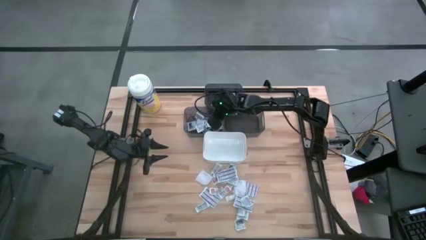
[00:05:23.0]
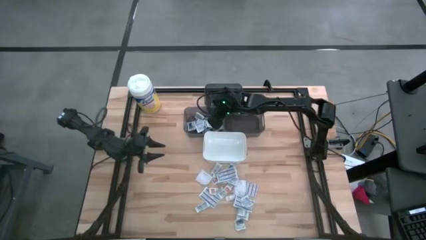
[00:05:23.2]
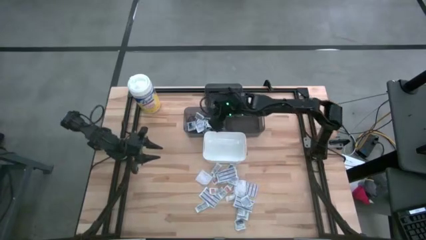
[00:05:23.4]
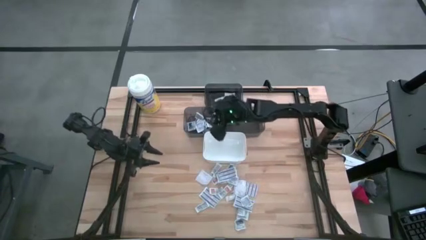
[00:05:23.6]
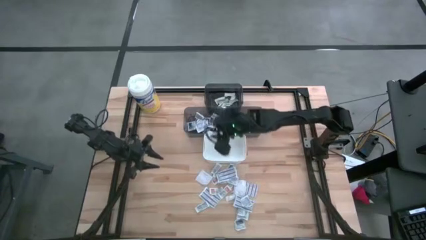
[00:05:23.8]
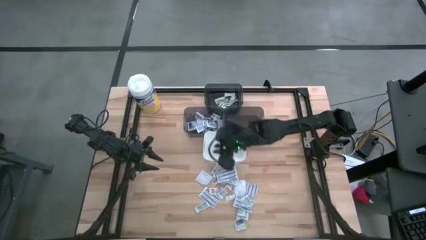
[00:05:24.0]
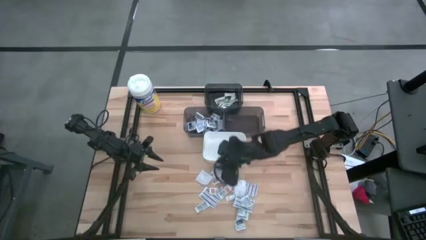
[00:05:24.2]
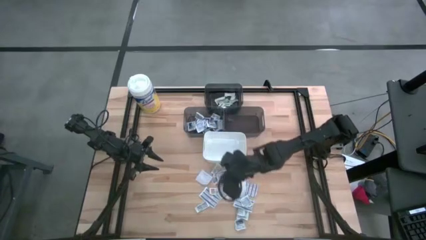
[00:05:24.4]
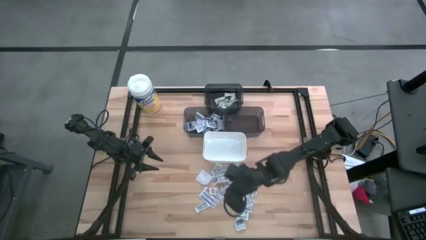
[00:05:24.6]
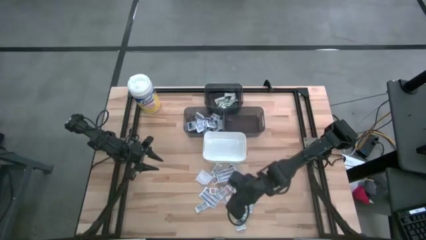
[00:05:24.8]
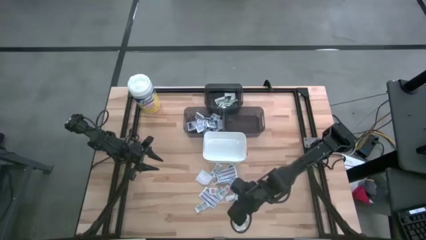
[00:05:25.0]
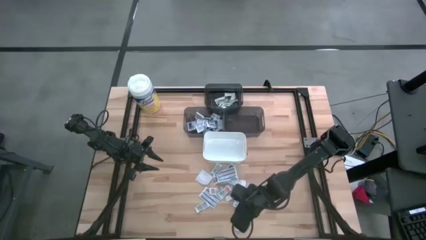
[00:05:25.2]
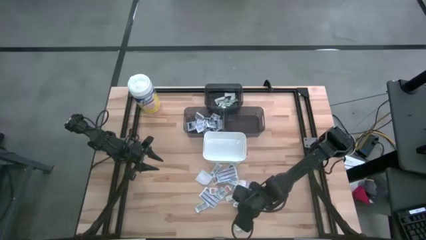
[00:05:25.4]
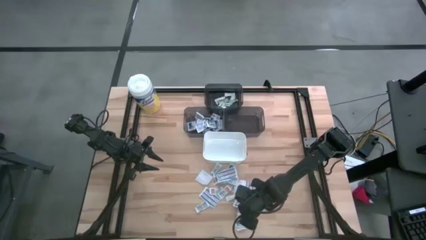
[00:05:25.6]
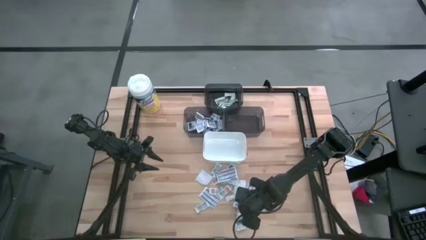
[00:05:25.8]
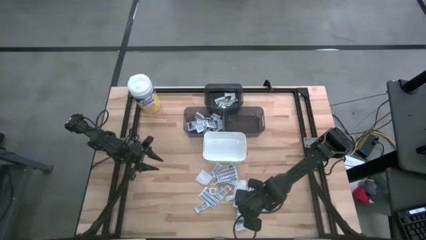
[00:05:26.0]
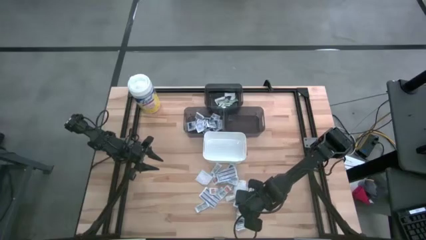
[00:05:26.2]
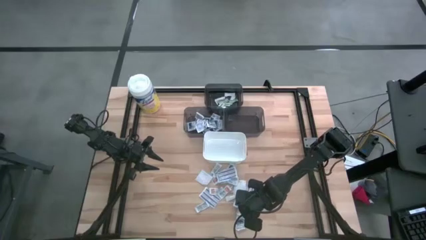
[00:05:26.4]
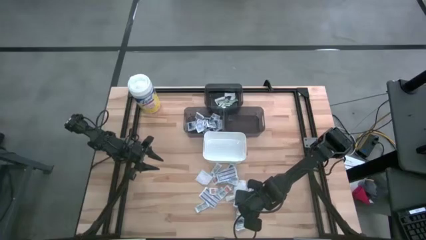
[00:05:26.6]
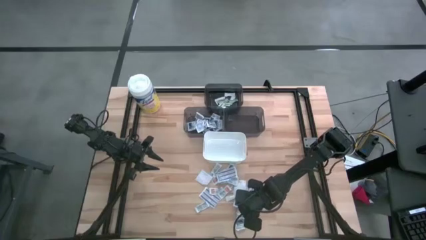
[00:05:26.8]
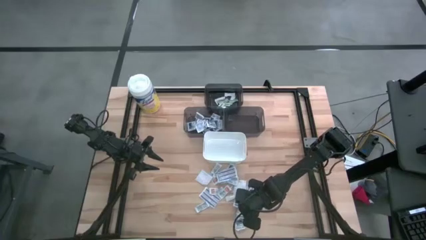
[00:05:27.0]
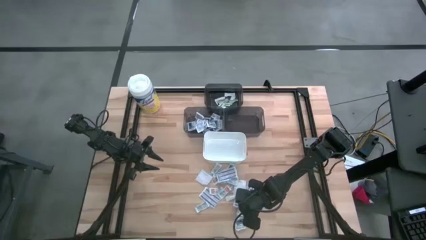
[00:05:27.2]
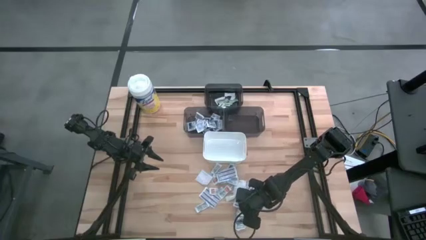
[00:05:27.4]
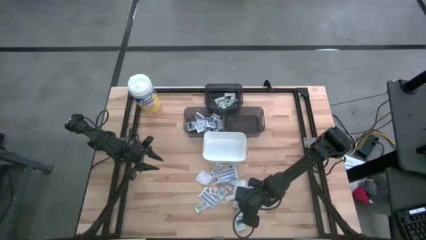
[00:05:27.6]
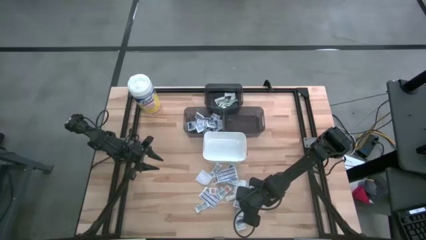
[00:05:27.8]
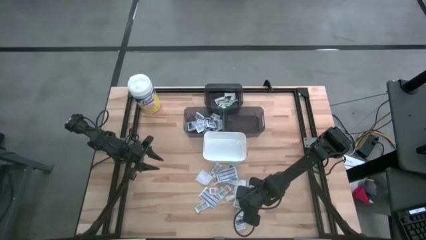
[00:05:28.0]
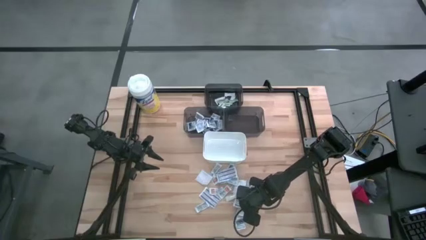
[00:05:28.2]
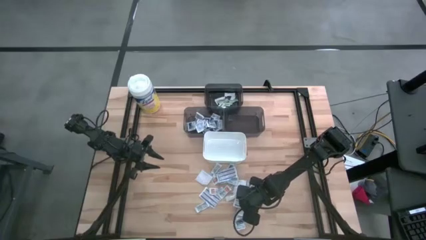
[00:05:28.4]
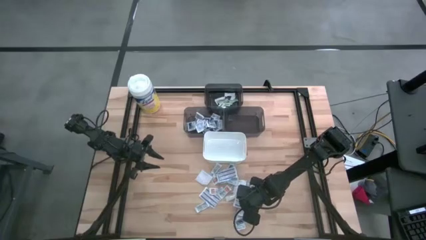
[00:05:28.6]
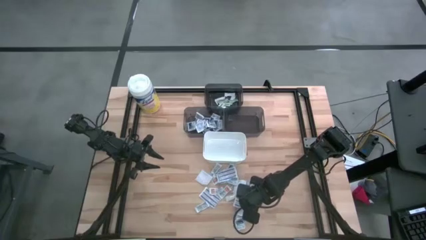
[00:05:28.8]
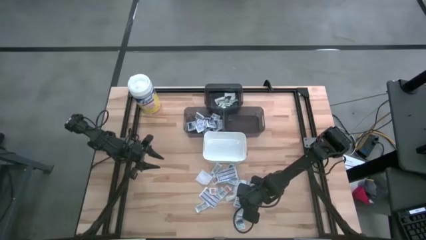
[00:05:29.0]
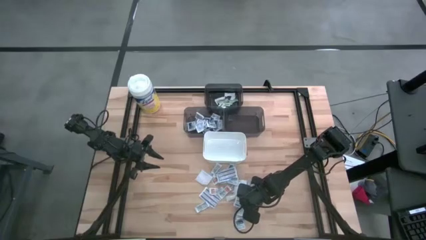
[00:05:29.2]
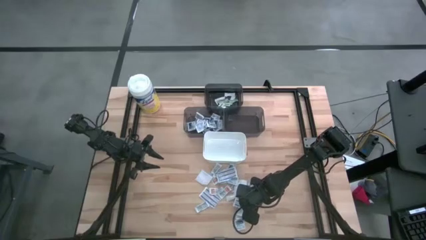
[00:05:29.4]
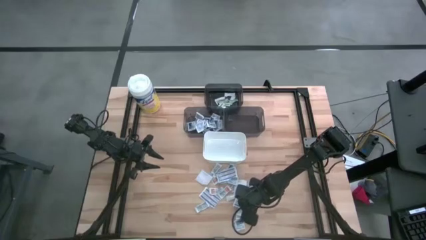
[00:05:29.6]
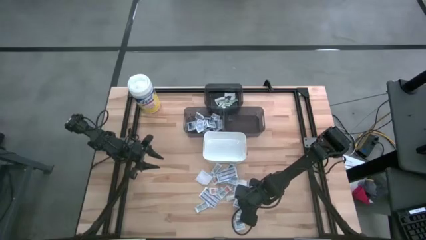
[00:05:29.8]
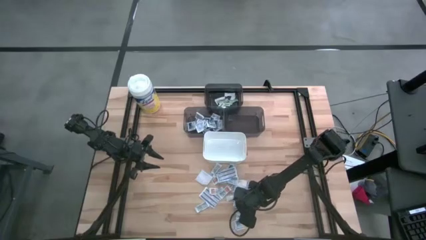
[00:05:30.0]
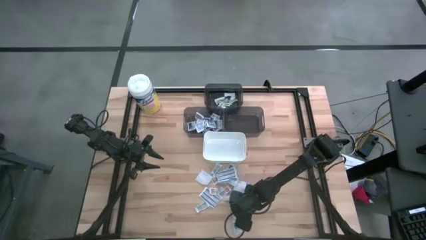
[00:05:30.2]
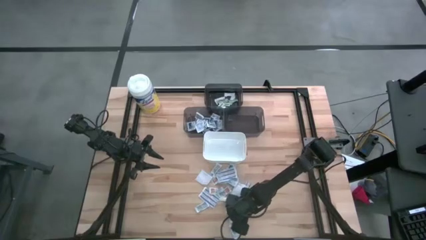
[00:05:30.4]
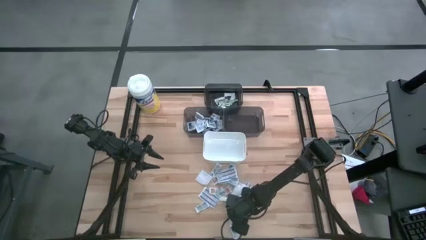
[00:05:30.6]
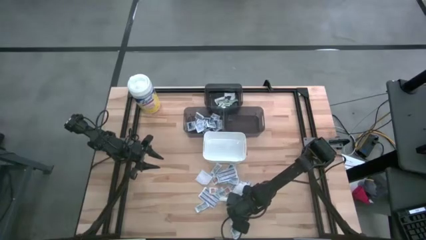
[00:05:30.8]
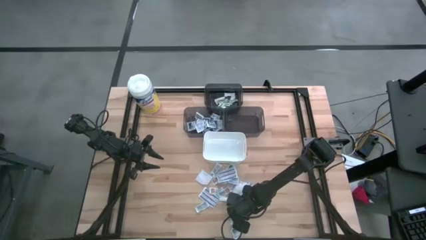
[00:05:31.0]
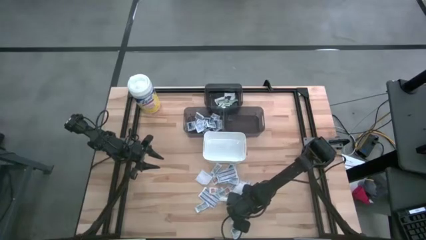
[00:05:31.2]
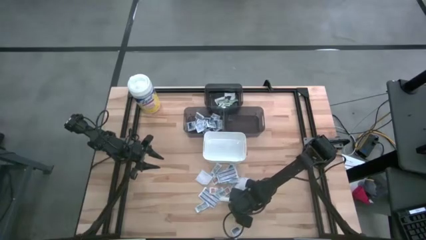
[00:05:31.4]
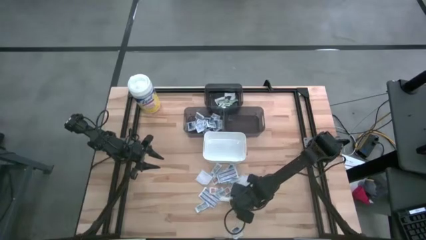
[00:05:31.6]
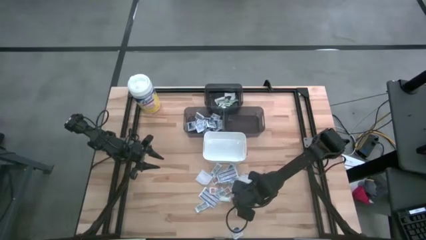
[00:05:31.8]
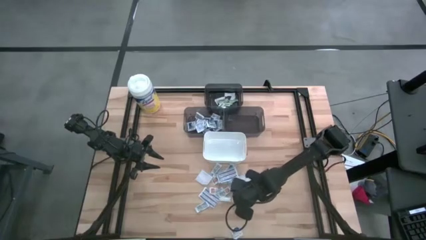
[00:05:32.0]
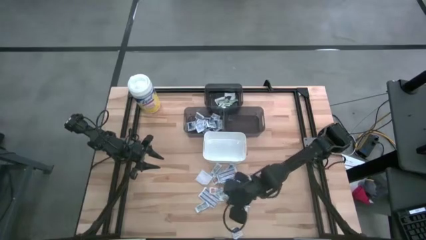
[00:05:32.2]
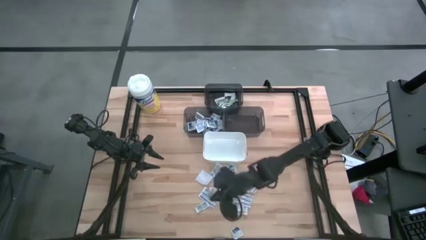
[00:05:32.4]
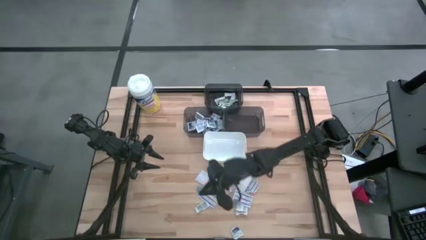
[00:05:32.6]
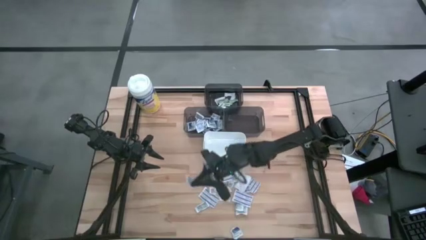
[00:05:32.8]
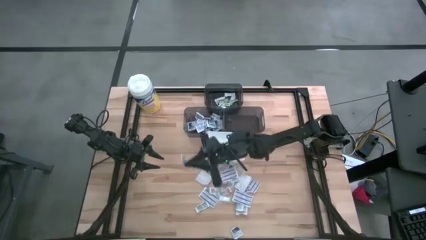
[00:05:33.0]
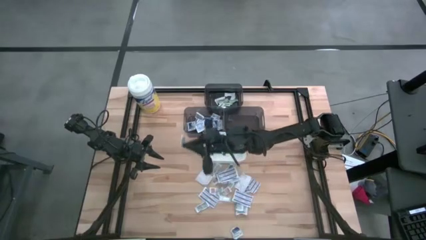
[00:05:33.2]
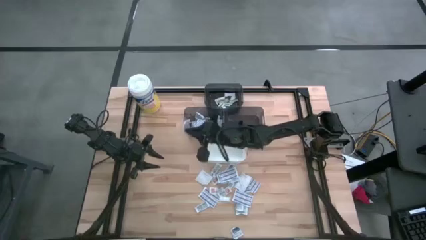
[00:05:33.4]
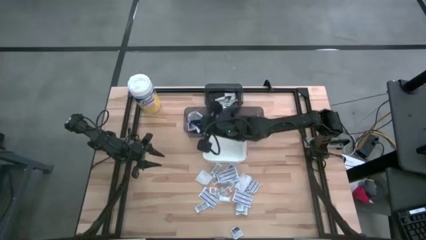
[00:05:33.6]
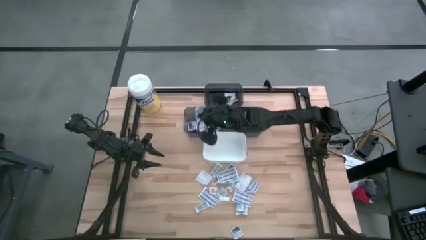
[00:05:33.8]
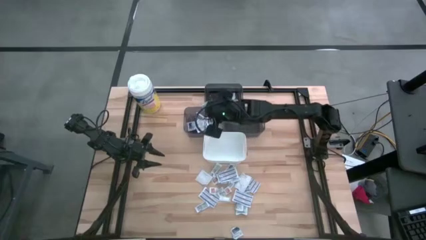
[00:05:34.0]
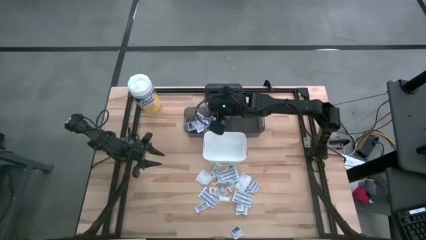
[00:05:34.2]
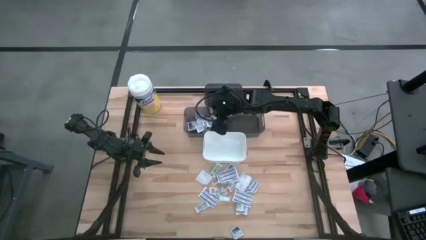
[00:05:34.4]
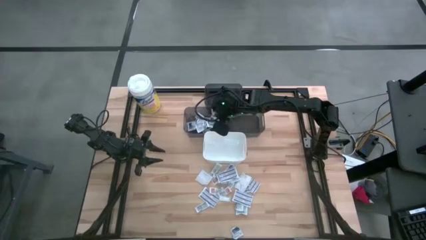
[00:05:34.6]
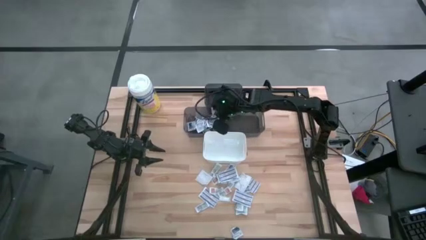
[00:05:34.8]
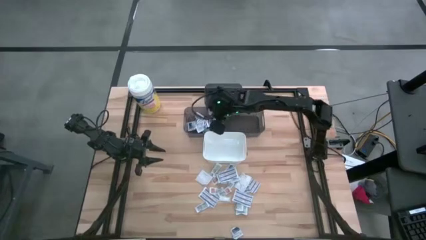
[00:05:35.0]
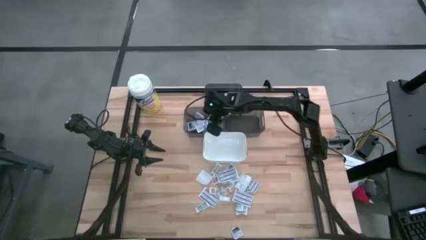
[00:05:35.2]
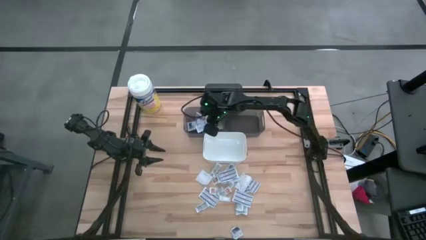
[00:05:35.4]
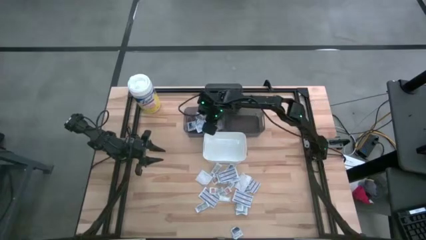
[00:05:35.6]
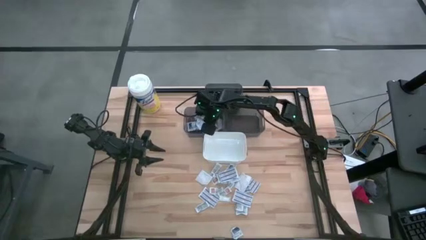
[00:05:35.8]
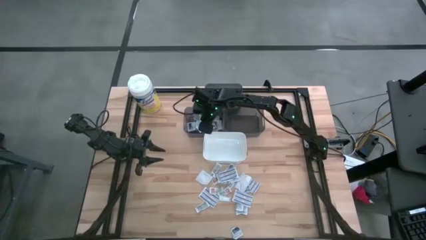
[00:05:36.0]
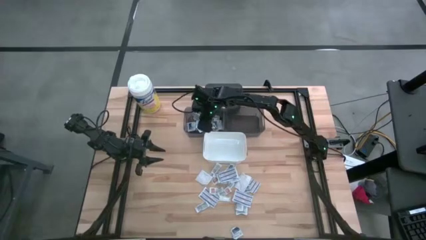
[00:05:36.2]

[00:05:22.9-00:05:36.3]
Task: Pick & Place First Aid Supplies
Put the alcohol pad into the left black bin

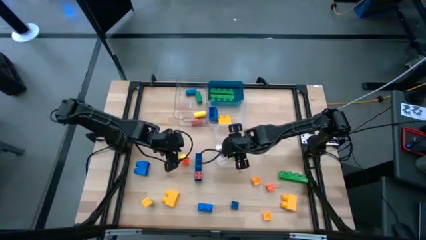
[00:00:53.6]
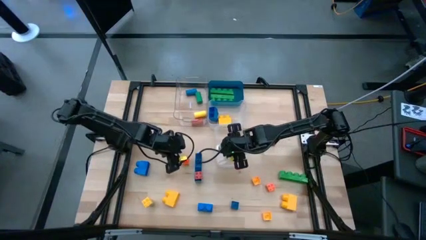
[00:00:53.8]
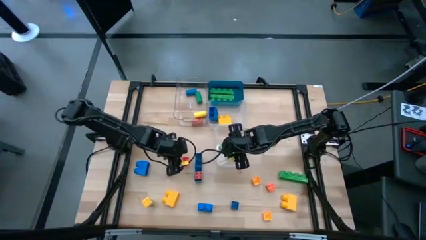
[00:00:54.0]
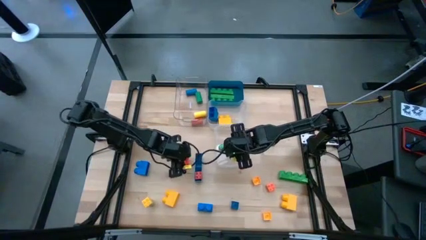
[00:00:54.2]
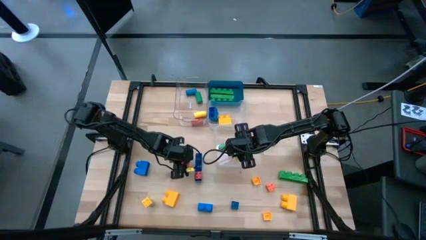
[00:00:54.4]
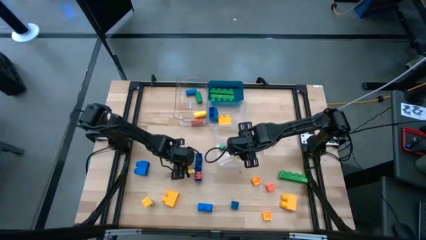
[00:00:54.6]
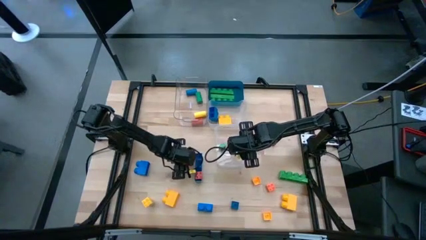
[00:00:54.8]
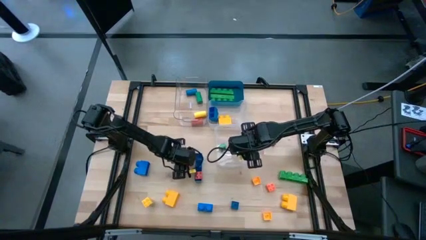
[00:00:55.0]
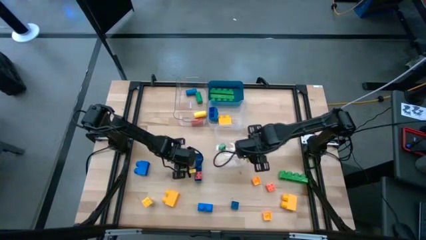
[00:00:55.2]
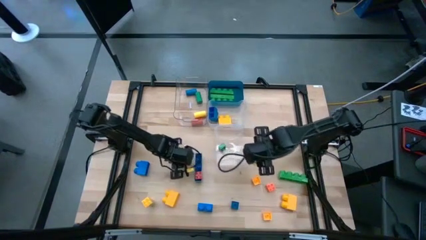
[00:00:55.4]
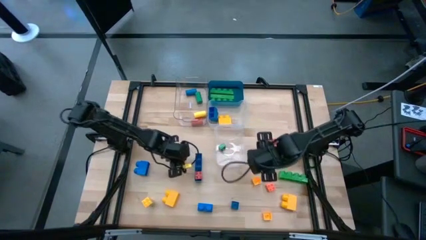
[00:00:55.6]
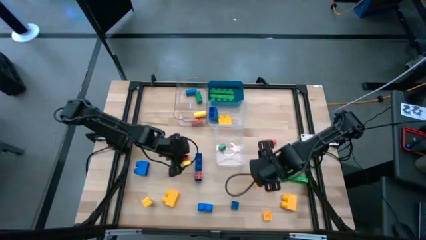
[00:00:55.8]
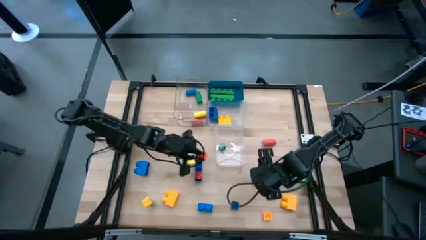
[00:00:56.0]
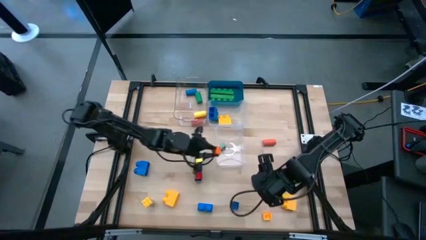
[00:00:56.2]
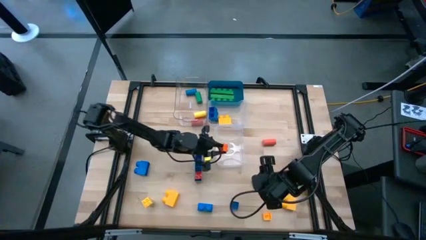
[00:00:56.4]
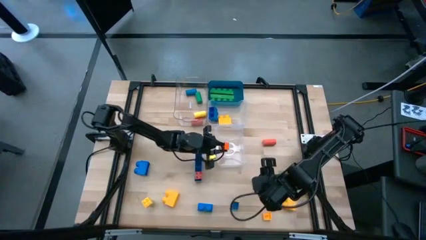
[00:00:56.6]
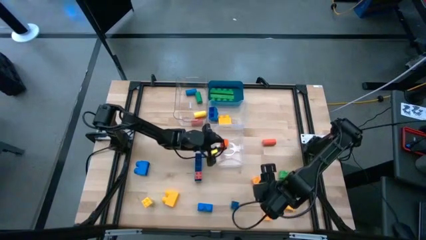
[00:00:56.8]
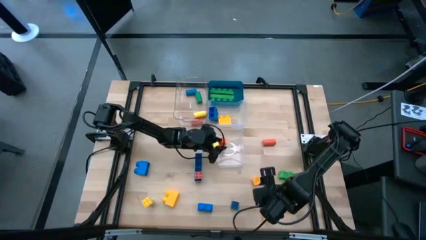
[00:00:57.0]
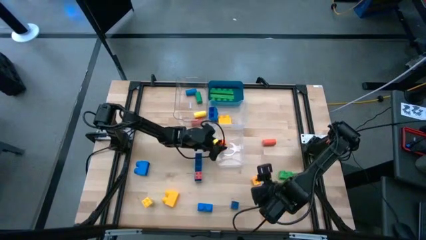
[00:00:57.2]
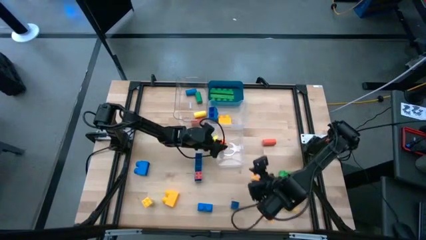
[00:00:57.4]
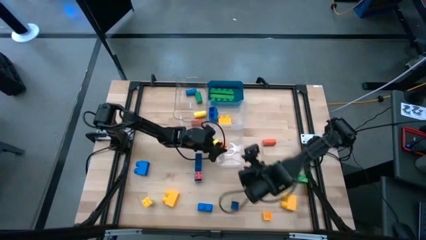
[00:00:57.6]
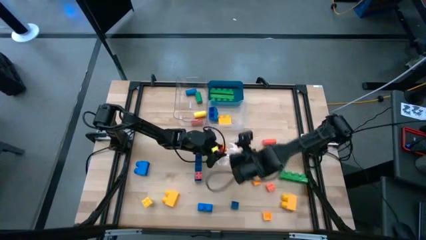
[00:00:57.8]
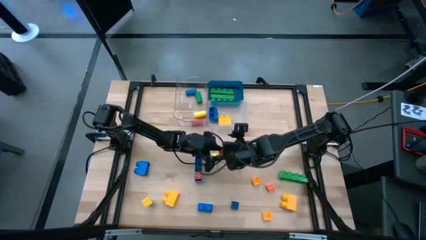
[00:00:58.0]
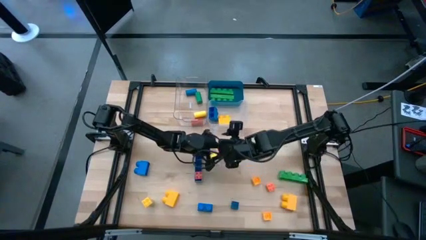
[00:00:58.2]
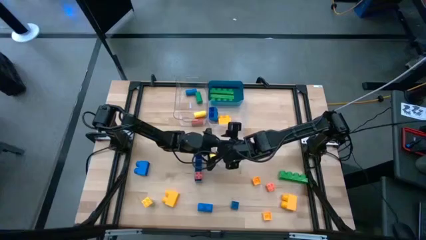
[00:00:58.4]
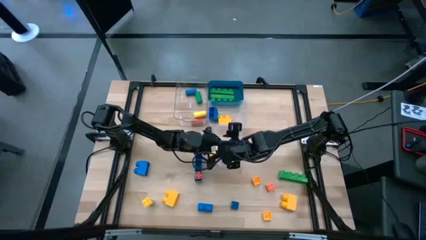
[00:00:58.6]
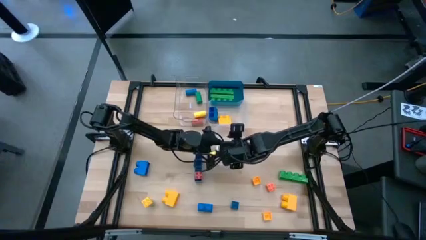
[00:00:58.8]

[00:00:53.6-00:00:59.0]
Task: Sort blocks by size
Put the orange 4 stud small game piece into the bottom transparent bin
